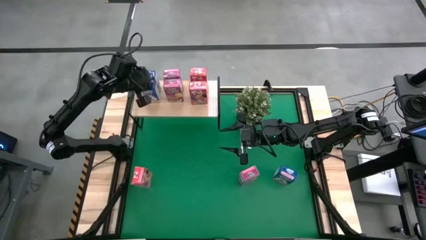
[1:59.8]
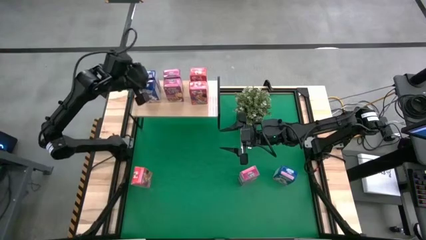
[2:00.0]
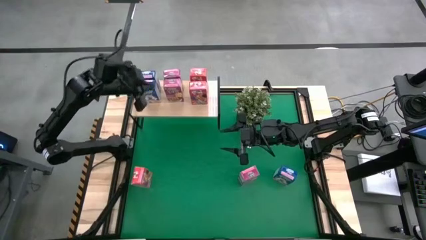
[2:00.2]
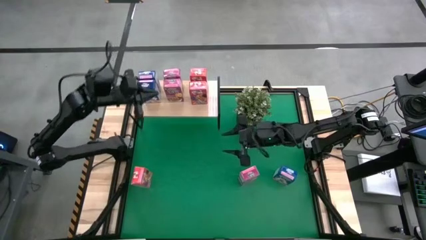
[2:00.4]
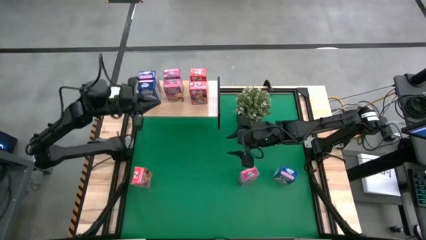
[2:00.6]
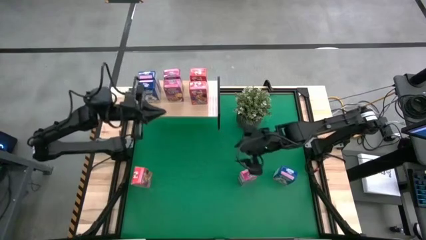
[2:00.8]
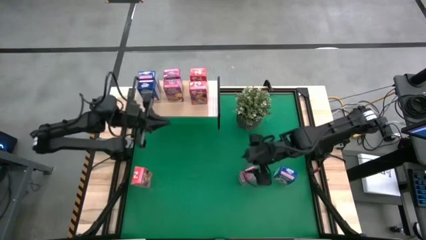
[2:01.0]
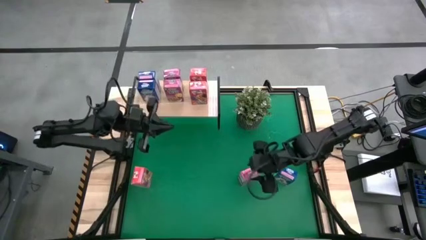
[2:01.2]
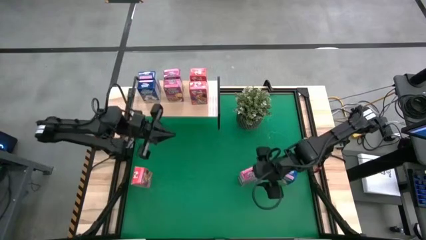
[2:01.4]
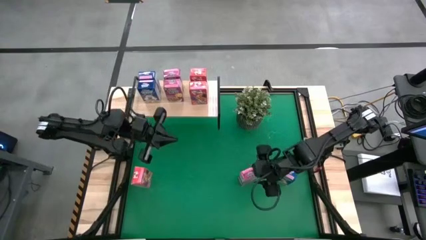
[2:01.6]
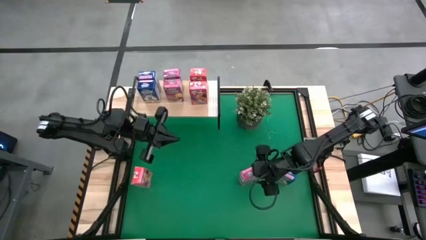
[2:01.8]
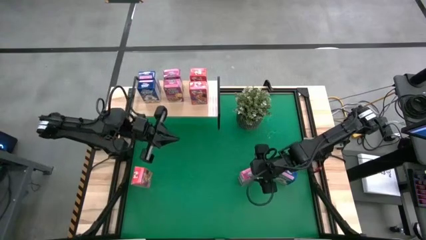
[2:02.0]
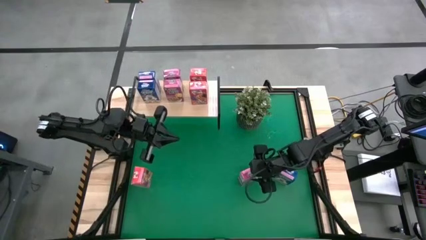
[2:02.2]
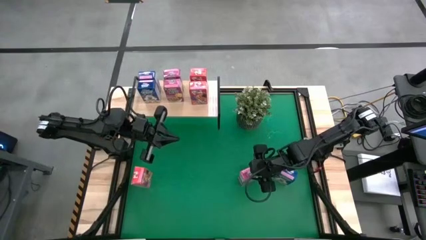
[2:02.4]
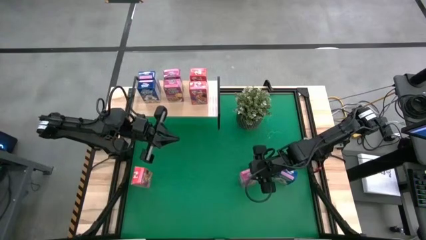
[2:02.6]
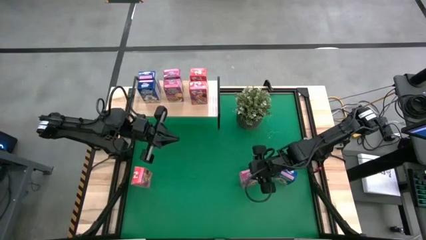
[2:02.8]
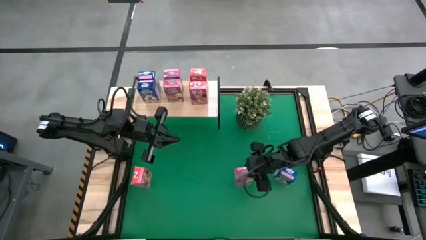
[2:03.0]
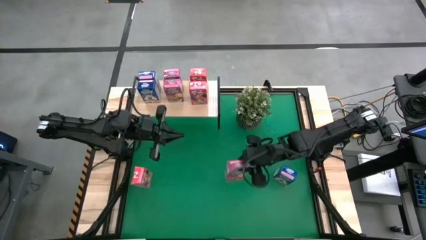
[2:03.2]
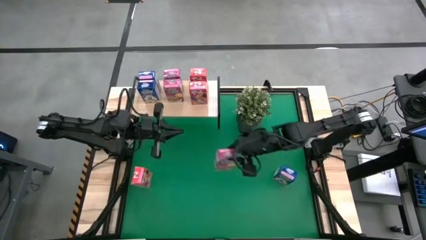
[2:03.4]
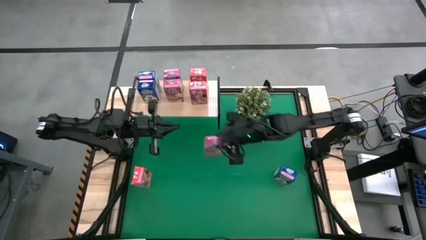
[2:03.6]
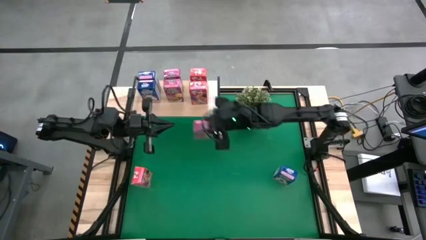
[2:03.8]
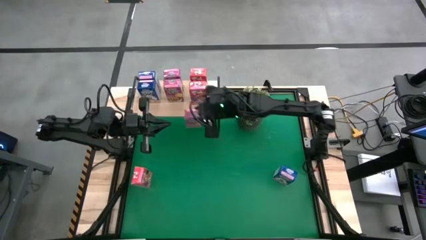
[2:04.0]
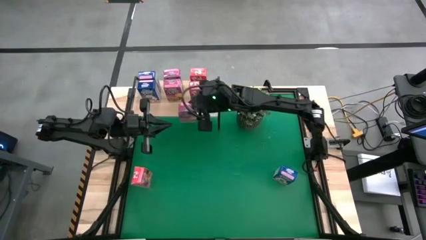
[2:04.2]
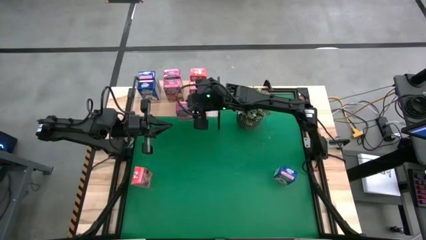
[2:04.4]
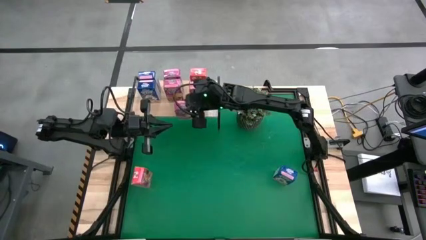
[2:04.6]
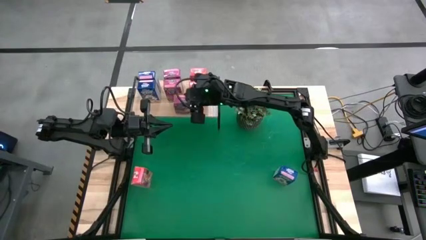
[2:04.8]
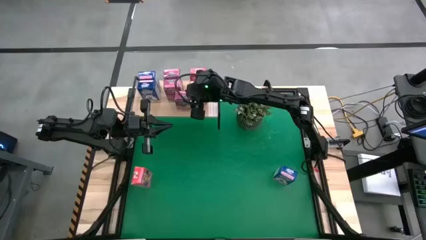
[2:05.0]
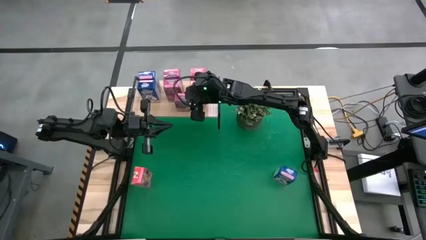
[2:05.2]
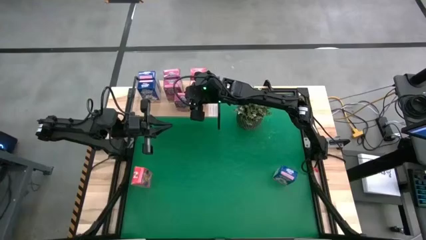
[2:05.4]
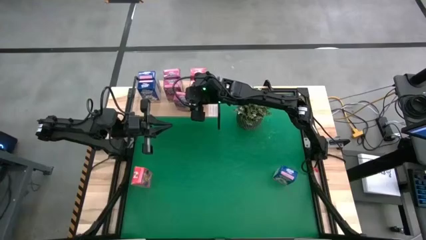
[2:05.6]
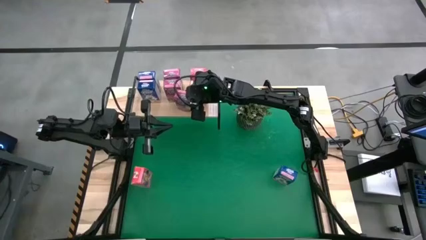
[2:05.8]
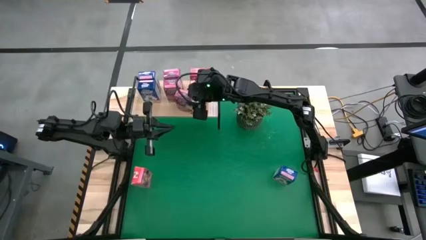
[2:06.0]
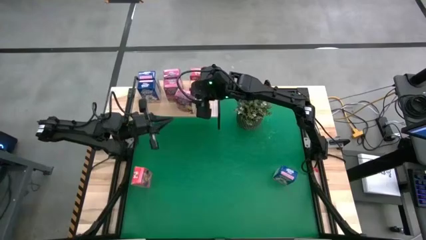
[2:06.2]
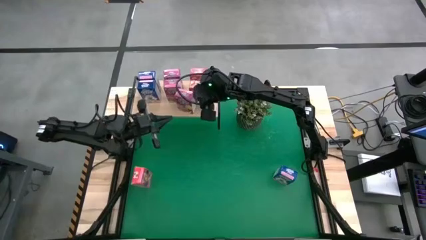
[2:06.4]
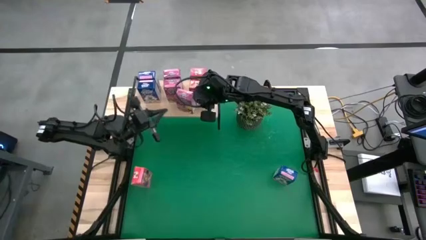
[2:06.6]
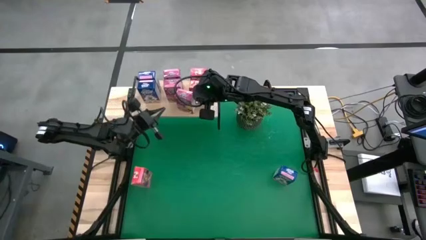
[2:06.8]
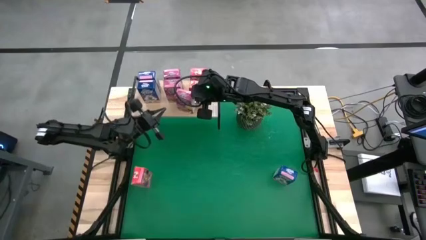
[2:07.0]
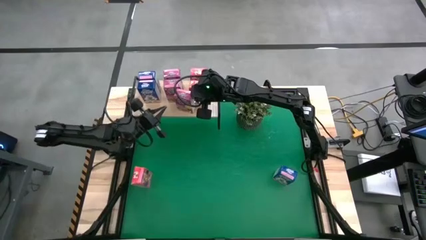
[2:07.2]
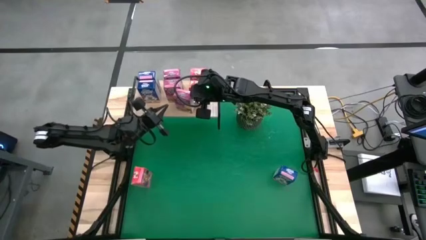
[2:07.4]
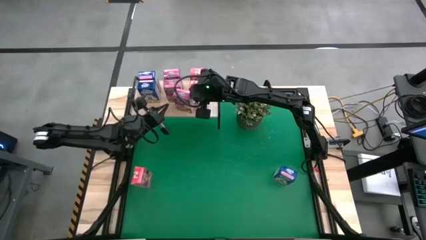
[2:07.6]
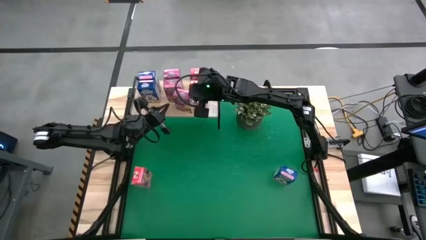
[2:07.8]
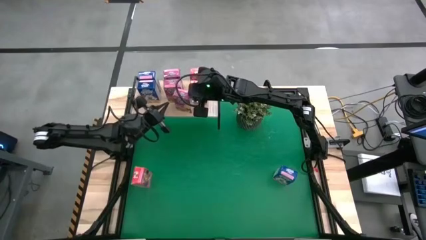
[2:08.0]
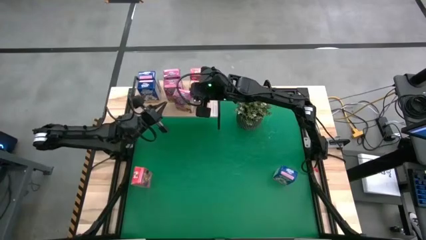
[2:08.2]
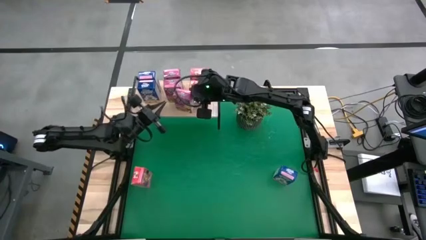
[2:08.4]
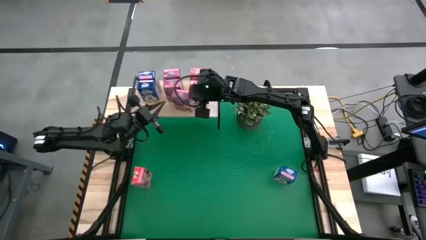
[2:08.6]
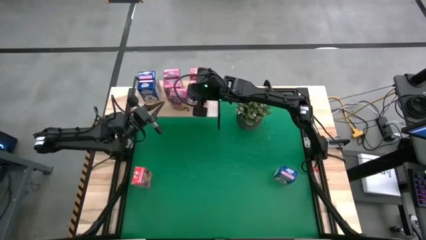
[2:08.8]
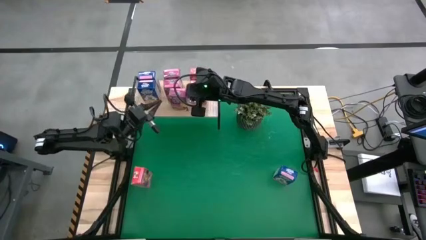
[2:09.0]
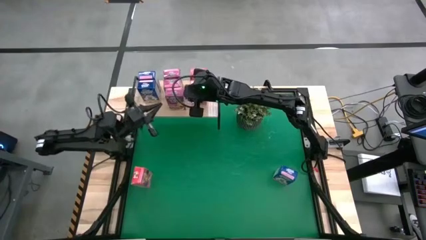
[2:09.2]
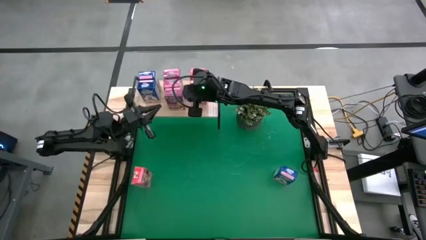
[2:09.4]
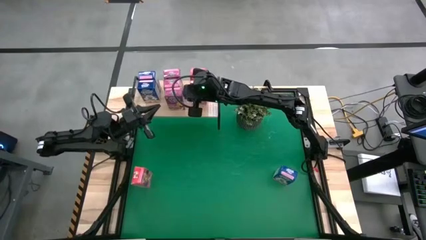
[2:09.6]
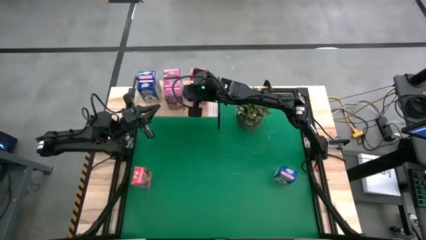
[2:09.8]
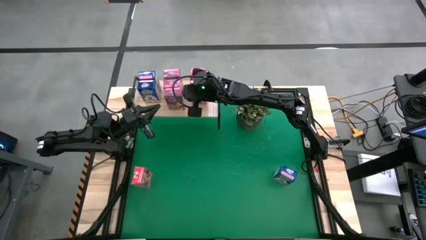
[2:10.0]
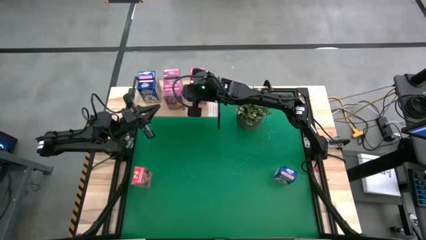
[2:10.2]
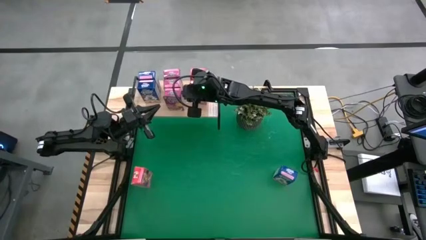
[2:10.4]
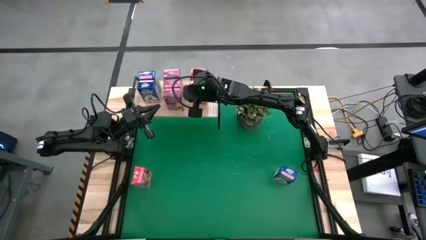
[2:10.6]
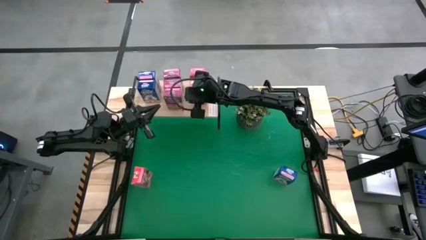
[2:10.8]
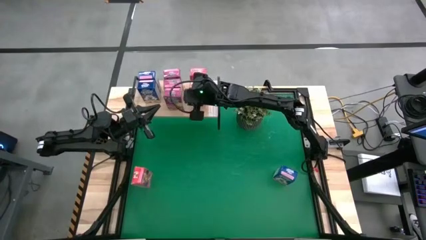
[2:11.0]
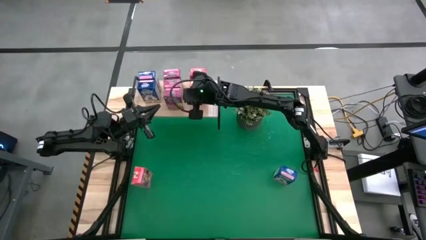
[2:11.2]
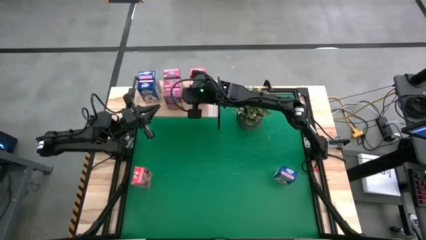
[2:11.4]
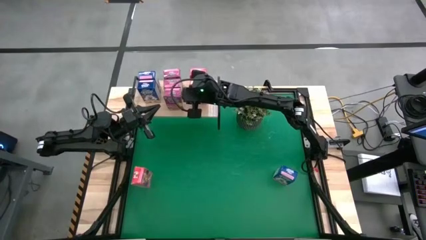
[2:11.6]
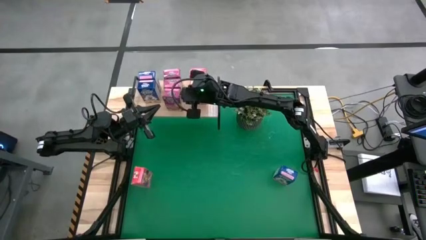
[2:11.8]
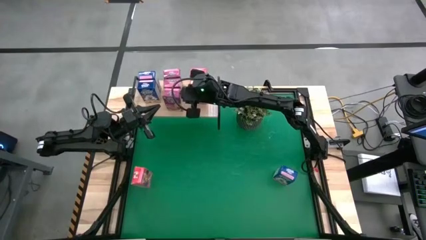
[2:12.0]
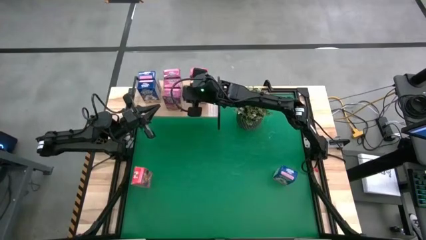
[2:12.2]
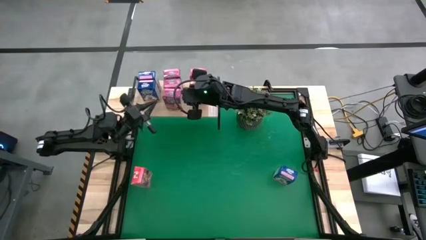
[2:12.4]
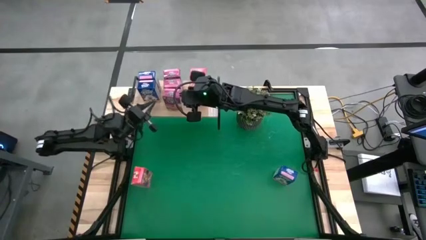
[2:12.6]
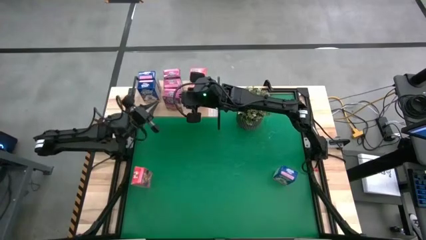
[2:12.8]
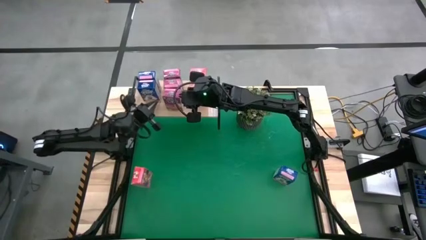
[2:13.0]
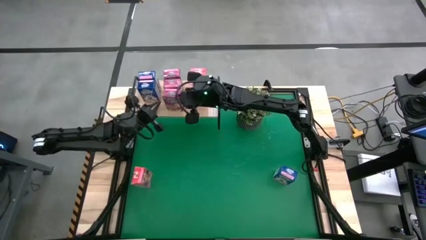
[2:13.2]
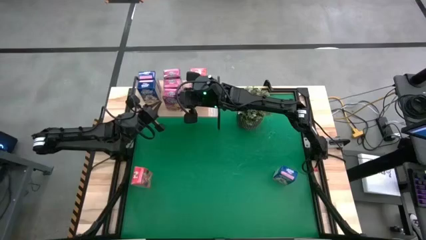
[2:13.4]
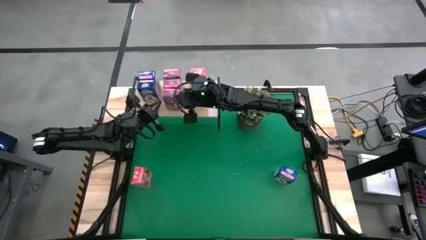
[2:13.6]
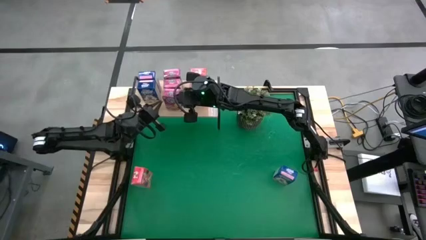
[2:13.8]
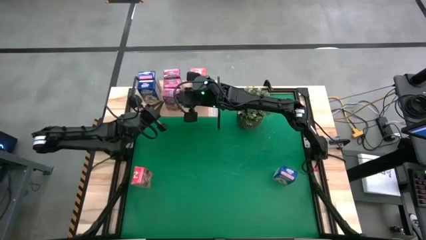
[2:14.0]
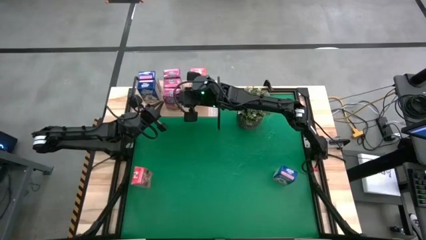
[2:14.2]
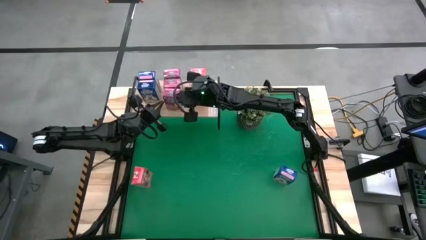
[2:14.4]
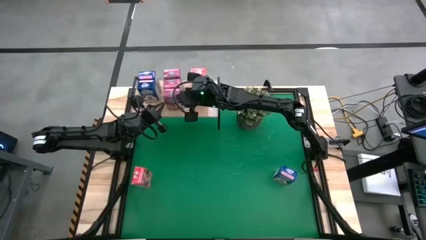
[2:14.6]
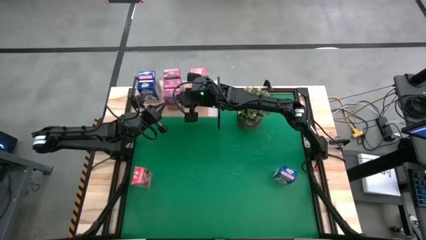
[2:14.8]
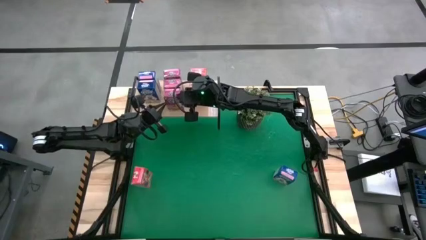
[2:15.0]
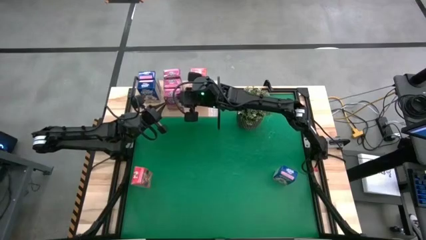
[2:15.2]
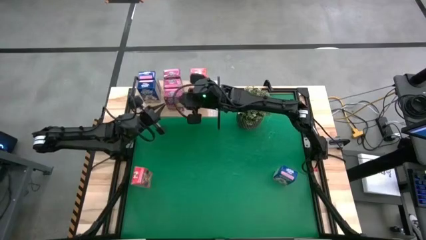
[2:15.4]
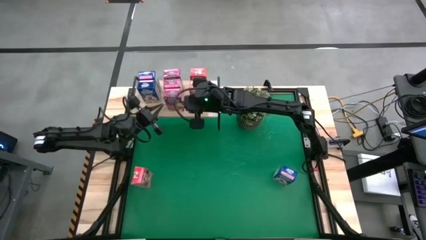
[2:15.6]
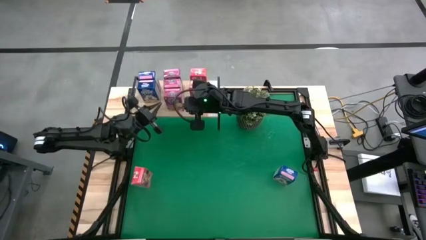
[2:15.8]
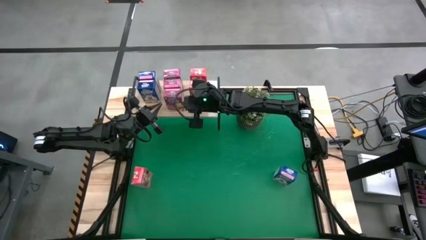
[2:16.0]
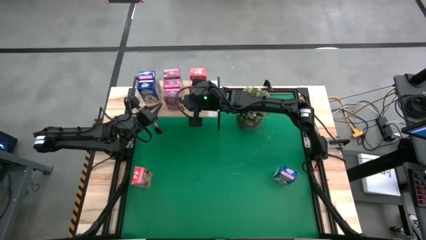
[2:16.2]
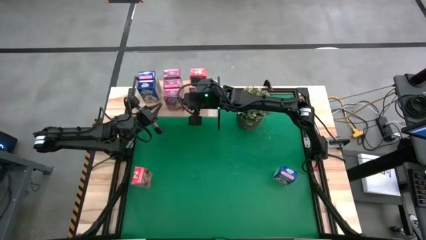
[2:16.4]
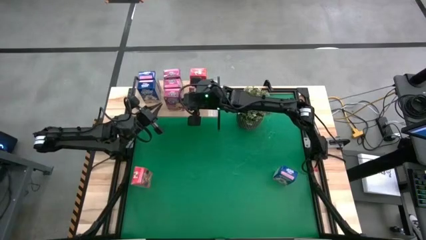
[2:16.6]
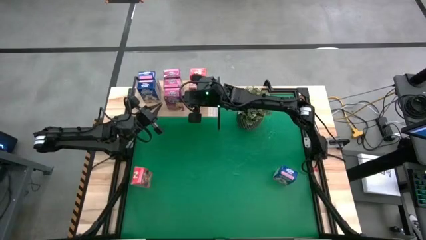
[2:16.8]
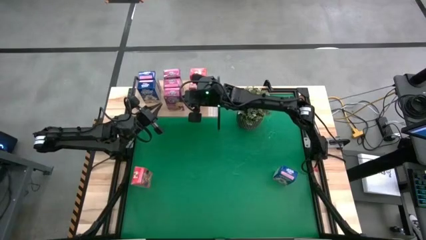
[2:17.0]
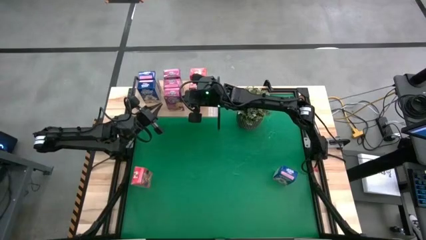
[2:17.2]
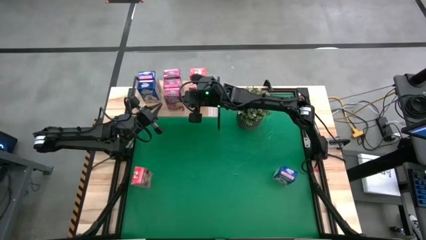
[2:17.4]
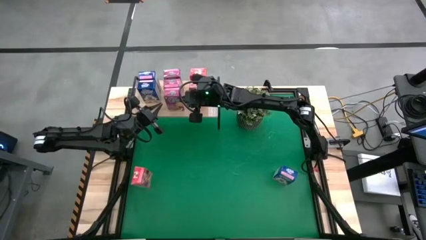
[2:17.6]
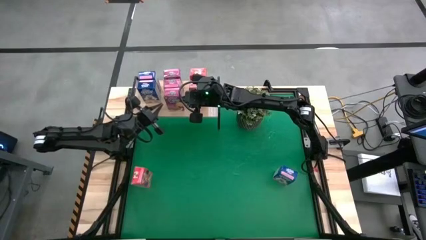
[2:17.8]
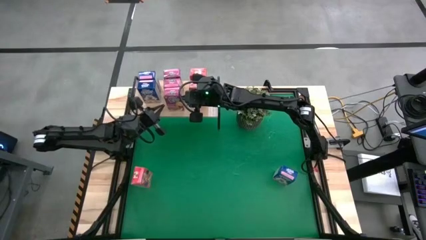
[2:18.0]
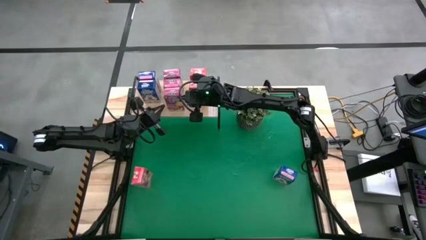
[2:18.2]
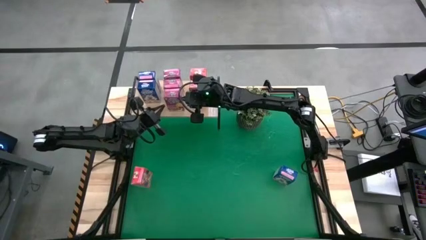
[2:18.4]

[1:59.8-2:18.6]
Task: Stack cereal on shelf
Put the pink cereal box on the shelf
